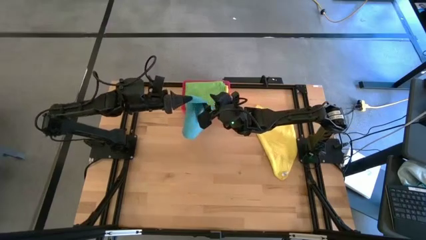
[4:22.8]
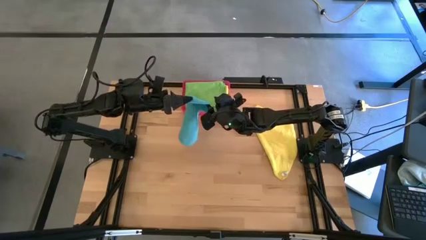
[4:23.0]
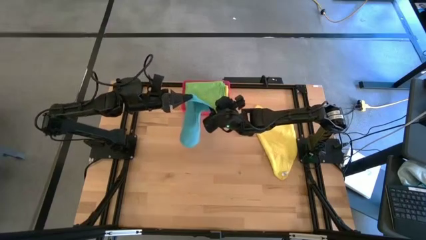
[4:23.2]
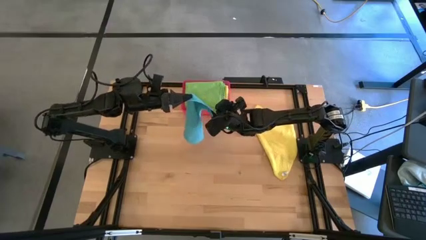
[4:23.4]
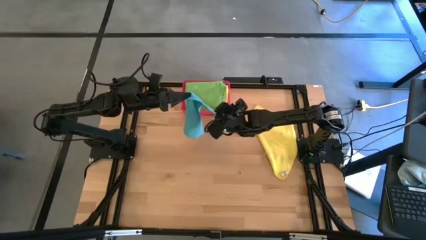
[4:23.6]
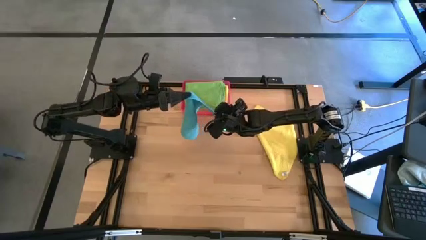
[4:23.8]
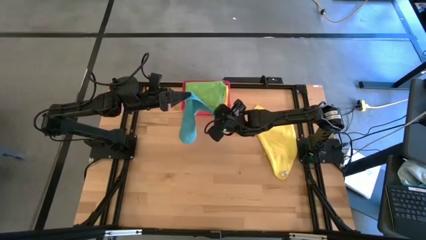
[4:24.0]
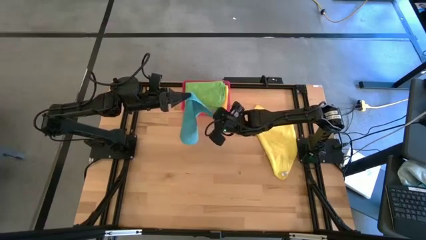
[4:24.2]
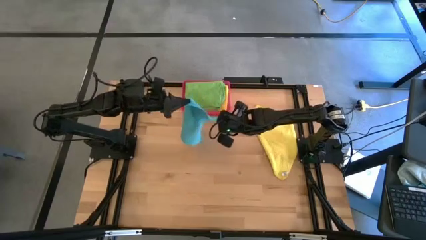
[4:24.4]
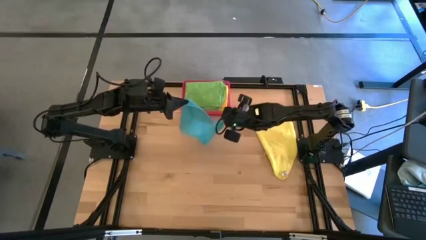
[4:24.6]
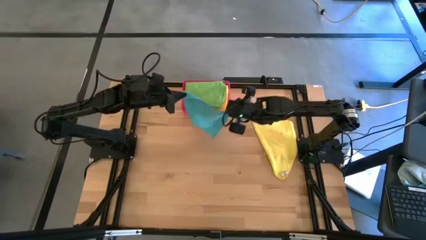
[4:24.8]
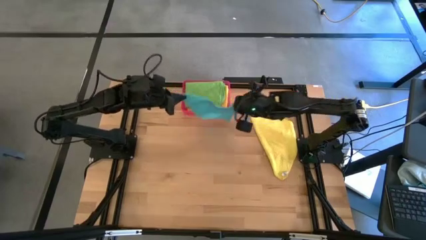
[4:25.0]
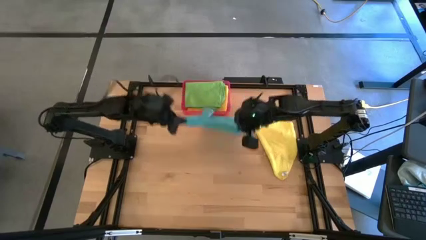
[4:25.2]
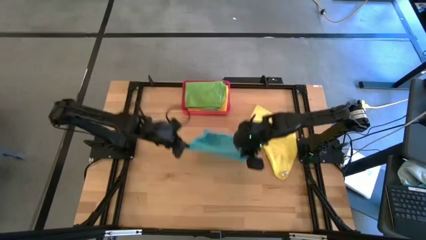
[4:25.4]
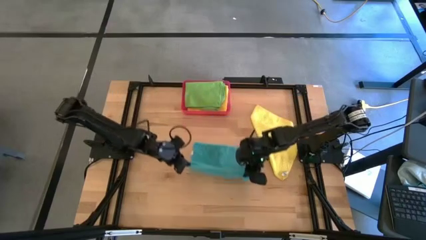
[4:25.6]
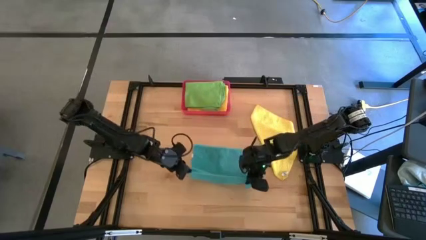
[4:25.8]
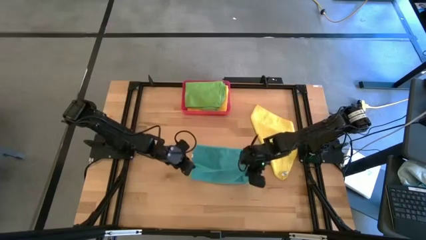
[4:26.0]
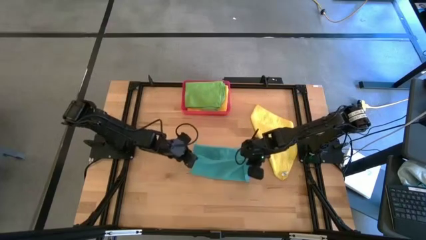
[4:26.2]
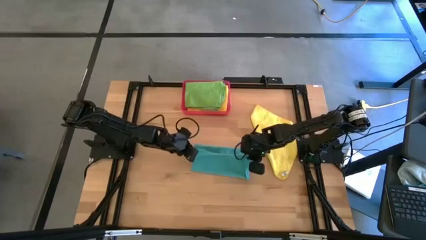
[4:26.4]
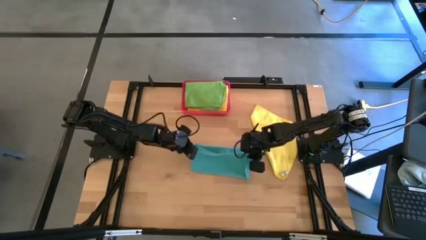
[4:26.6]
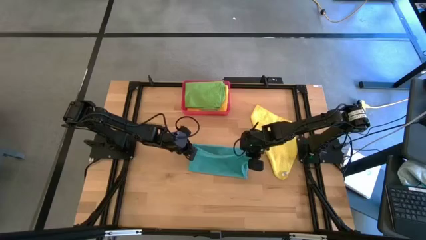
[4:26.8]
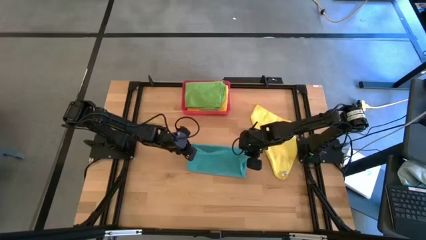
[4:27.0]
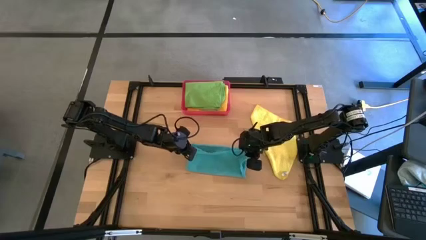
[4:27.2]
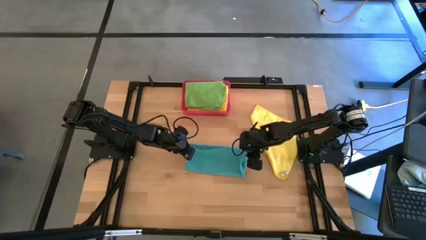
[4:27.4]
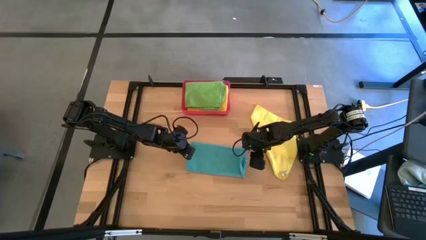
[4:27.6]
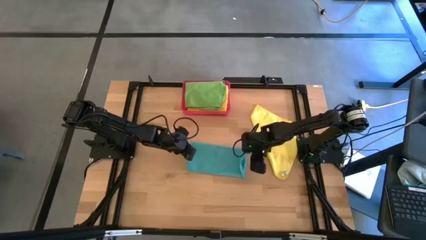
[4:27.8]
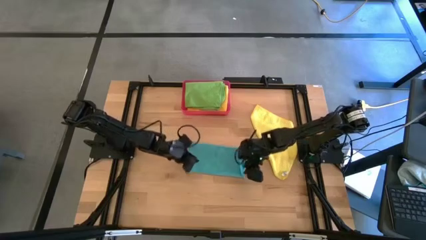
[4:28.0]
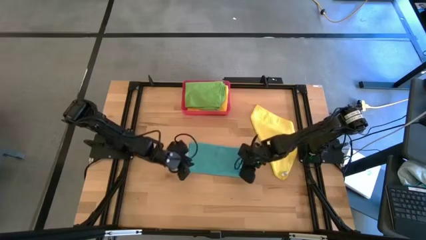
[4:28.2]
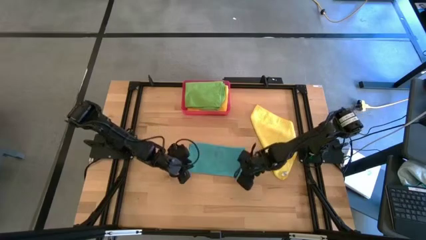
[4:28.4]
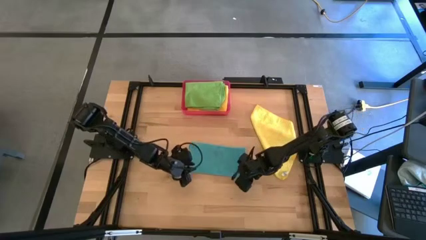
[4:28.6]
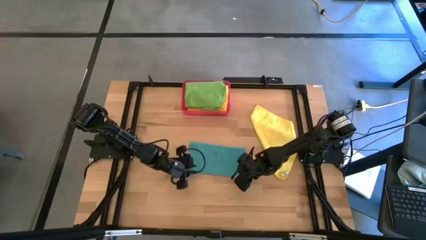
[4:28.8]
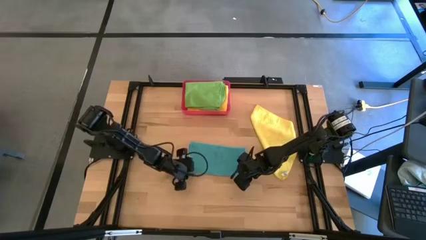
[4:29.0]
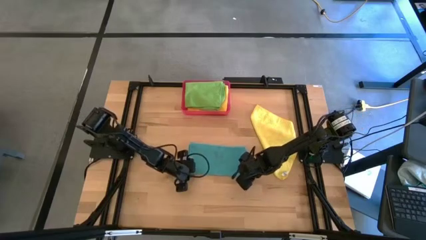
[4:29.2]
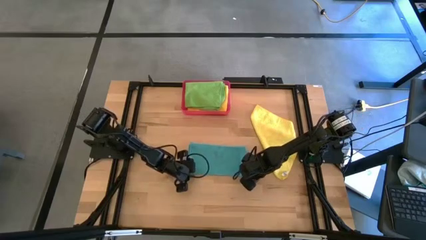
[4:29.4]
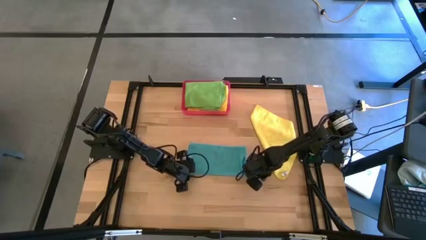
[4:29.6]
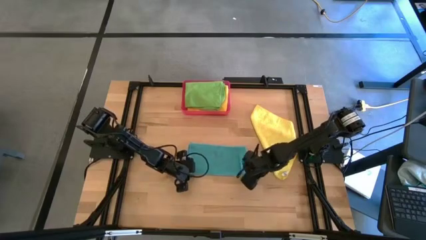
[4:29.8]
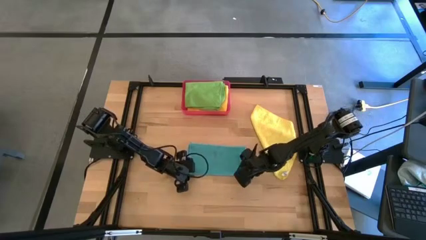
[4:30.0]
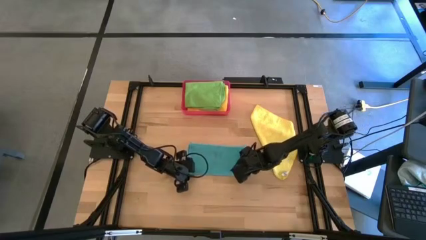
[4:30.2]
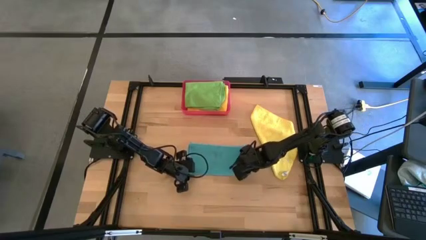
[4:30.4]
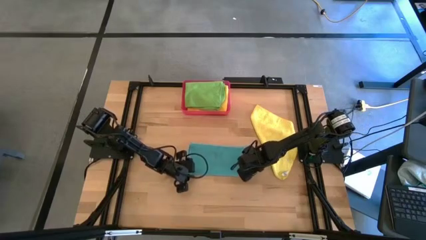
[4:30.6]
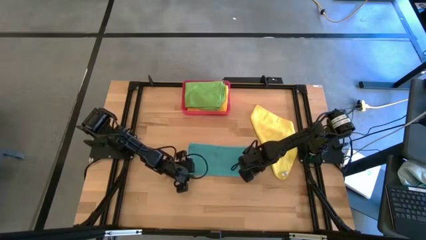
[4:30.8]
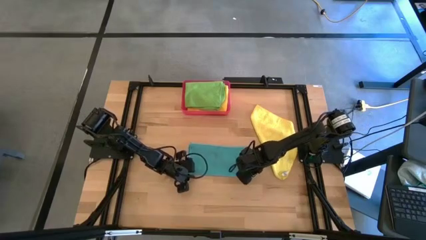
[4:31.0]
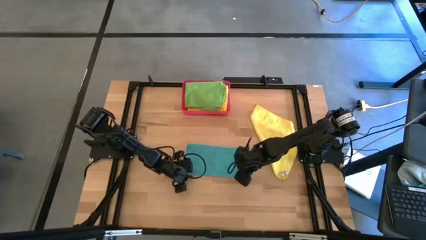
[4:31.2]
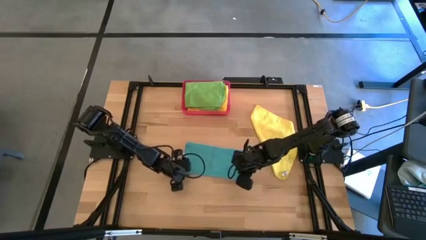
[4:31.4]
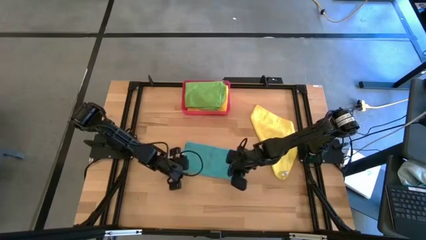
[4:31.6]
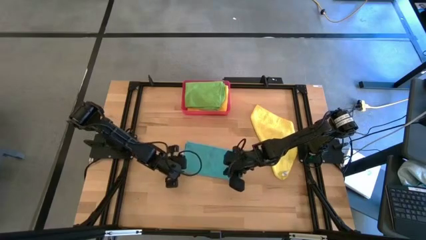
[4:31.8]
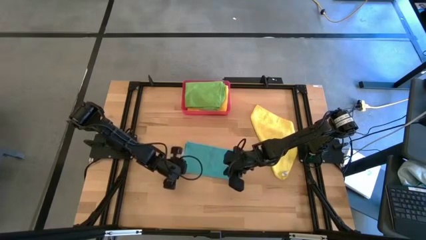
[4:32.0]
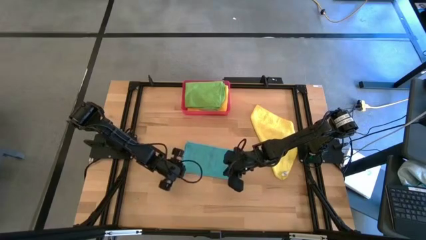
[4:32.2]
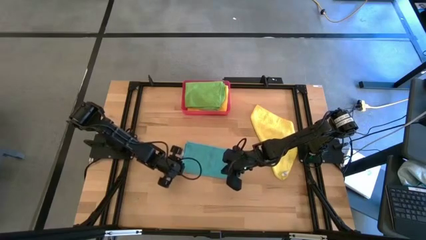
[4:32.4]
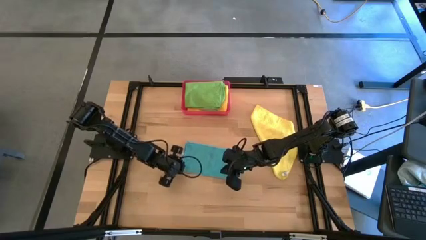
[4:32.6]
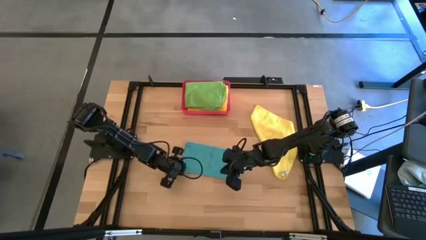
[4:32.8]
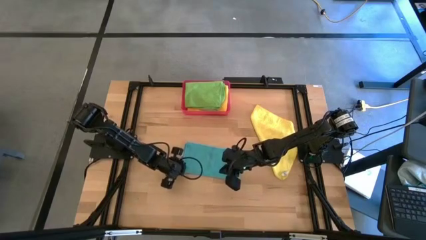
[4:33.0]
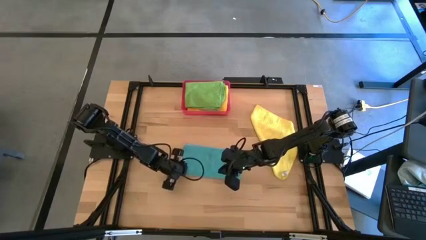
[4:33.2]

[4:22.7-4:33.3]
Task: Fold microfiber towels
Fold the blue microfiber cloth

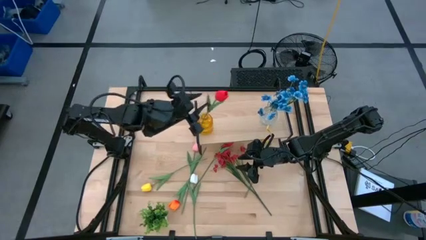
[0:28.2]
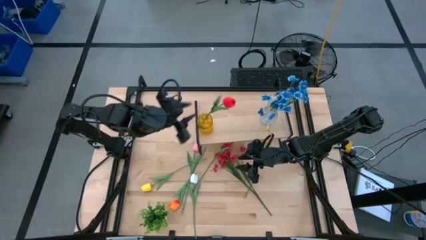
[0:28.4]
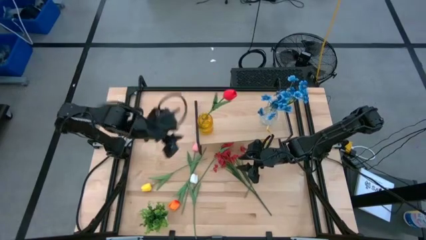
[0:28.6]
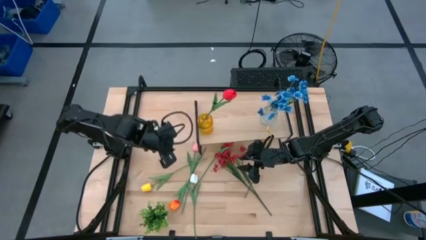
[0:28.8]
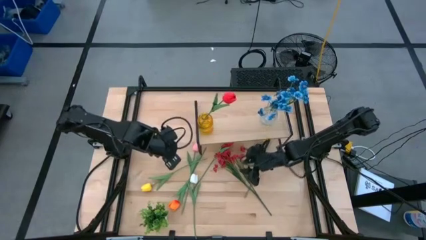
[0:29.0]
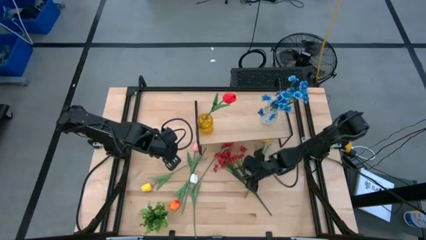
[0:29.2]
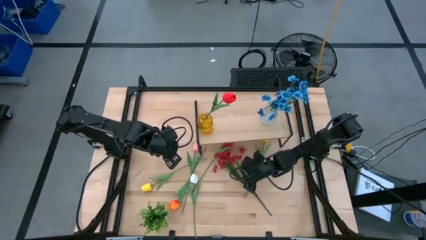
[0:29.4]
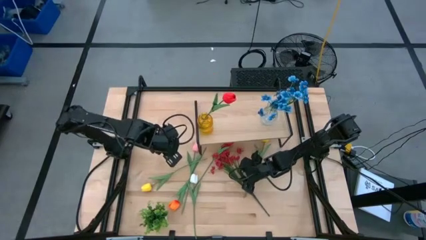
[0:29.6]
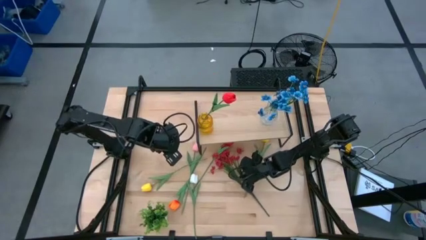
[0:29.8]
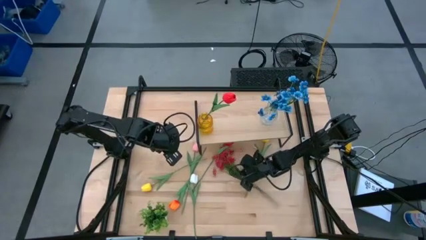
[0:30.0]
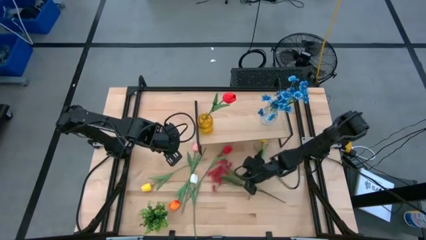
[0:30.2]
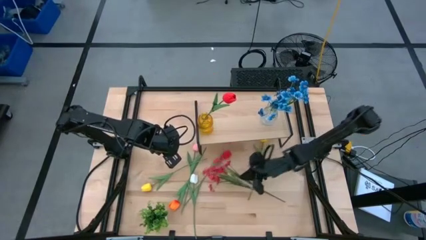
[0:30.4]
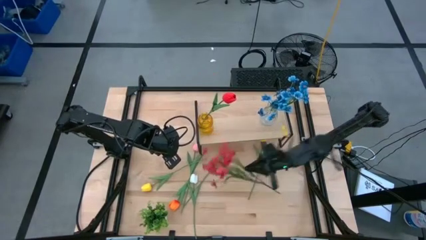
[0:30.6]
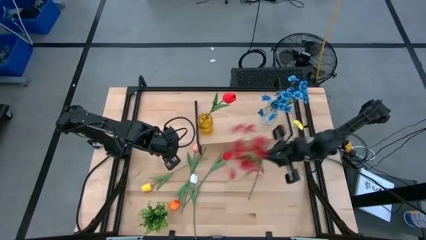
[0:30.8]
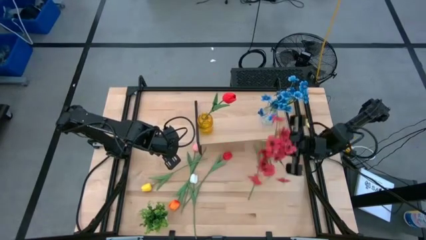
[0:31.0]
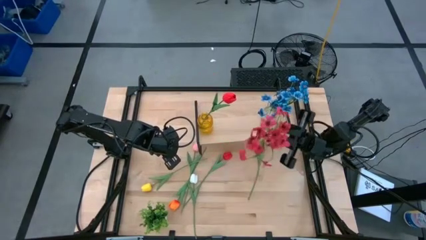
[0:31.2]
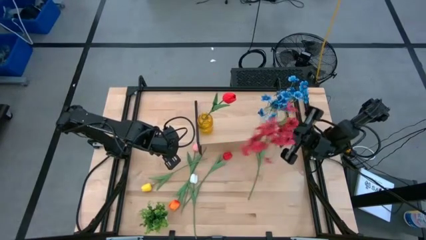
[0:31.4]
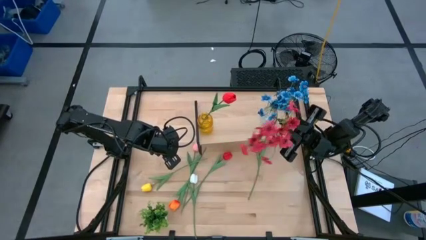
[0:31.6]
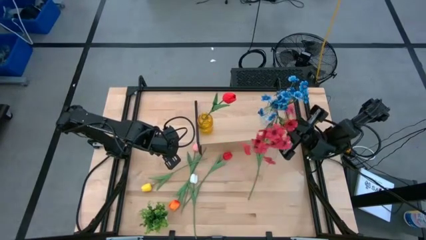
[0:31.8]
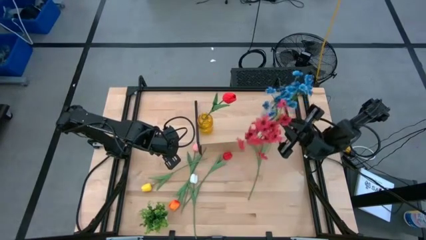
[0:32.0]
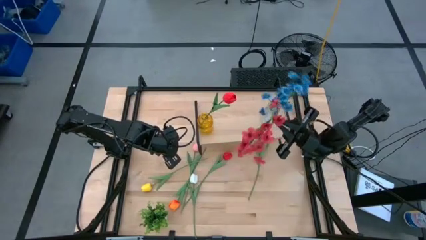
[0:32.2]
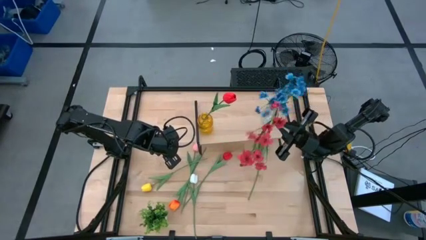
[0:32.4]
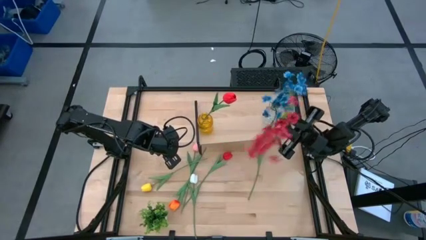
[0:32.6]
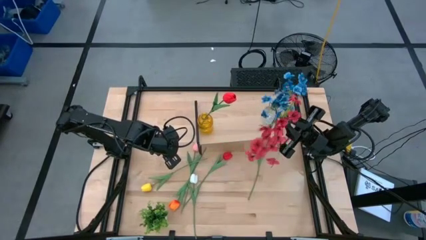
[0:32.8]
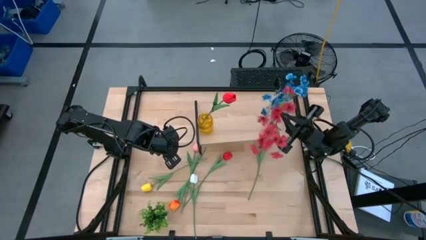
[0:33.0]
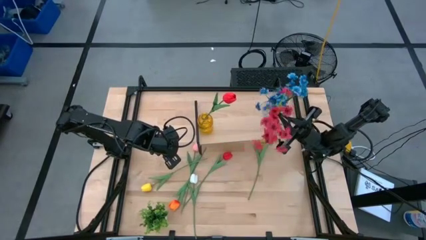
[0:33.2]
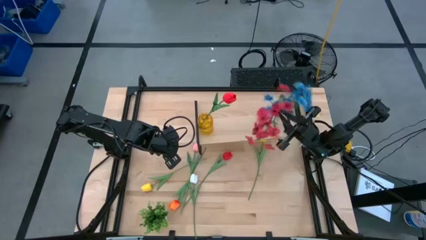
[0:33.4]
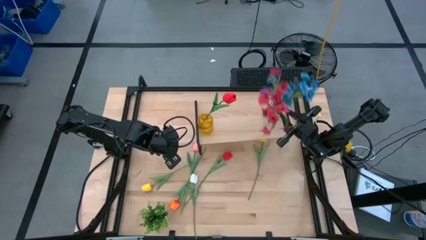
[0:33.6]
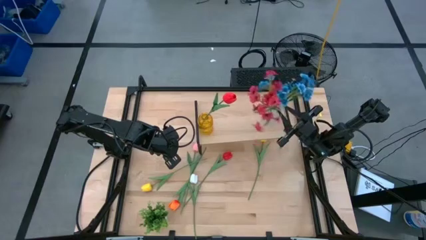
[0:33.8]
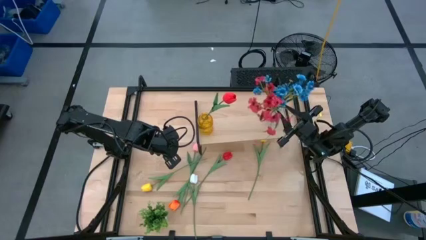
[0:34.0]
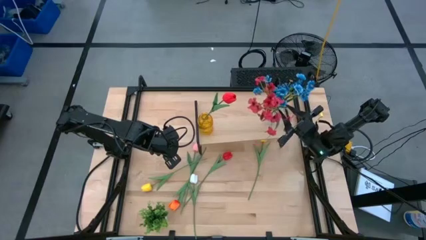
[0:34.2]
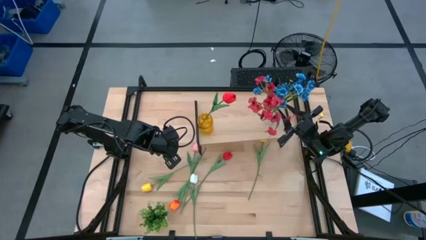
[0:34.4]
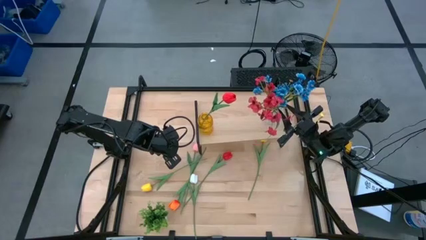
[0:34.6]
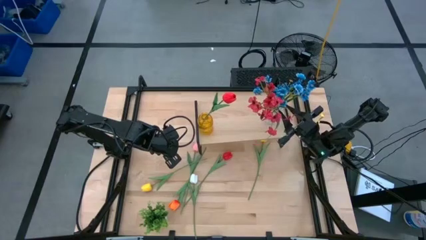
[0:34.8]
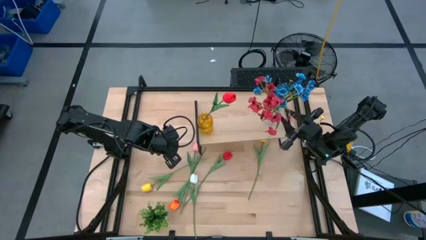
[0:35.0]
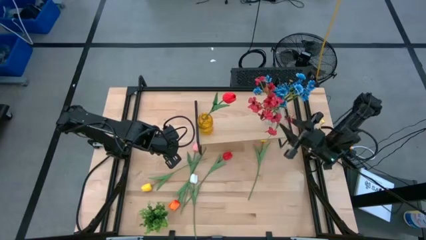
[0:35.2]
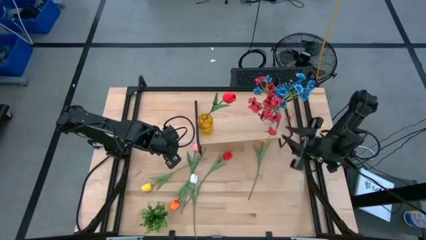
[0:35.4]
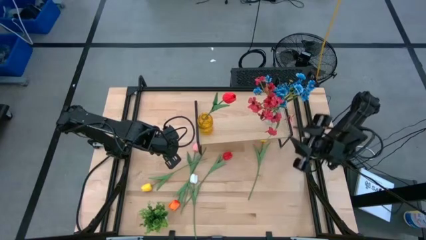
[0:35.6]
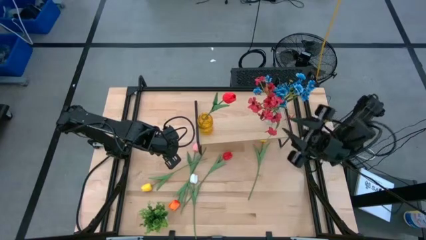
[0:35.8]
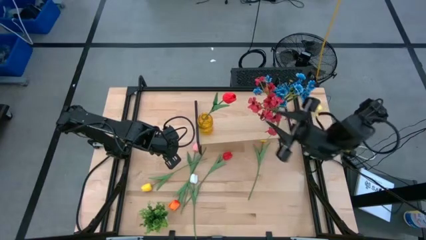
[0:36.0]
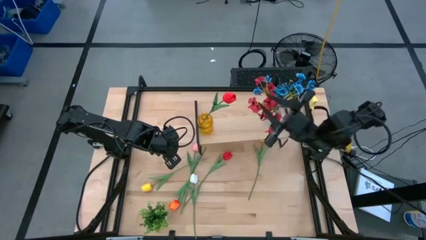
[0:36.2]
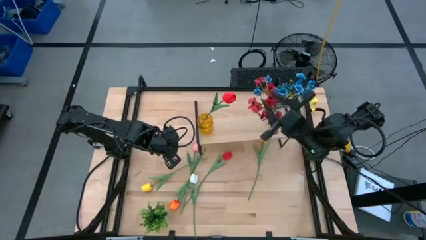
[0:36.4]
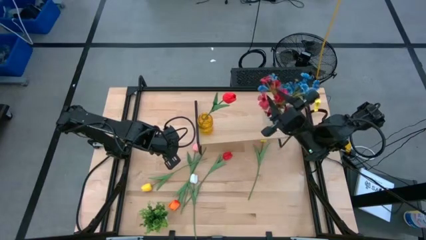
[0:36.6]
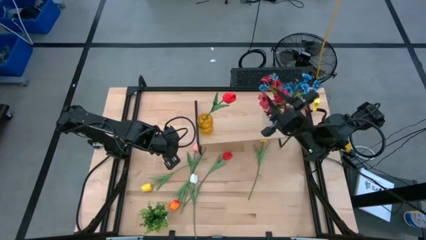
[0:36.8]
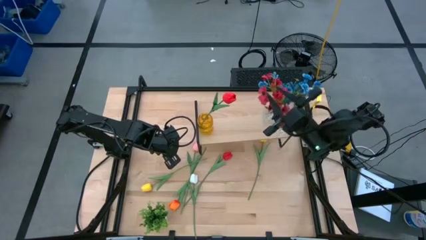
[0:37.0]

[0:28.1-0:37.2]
Task: Pick and place flowers into a vace then onto a shelf
Put the red flowers into the transparent vase
